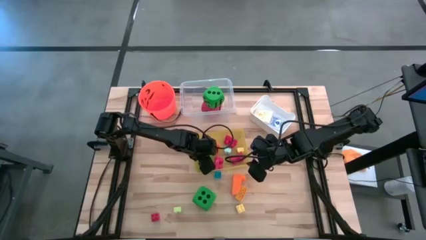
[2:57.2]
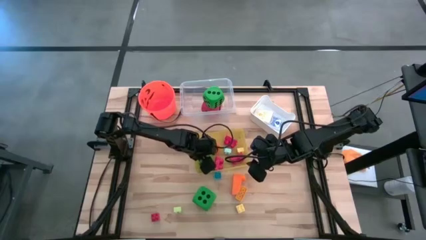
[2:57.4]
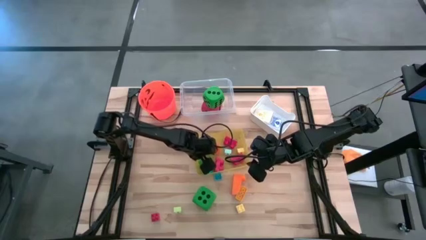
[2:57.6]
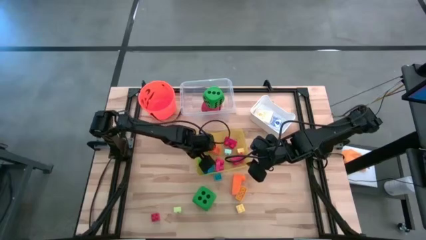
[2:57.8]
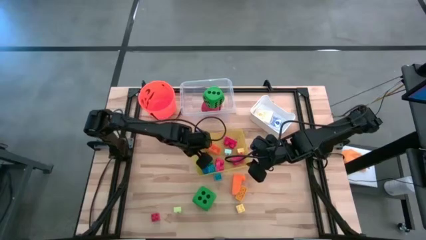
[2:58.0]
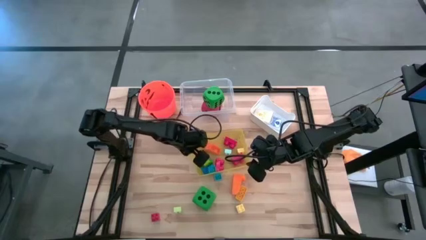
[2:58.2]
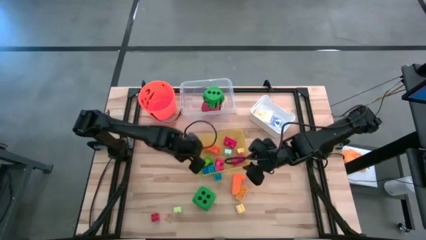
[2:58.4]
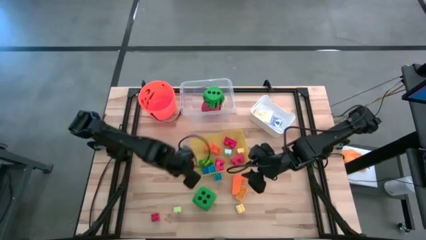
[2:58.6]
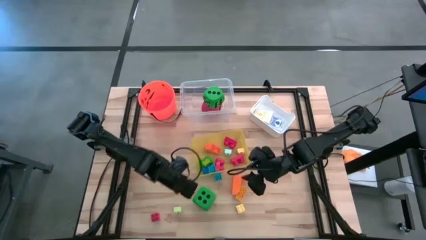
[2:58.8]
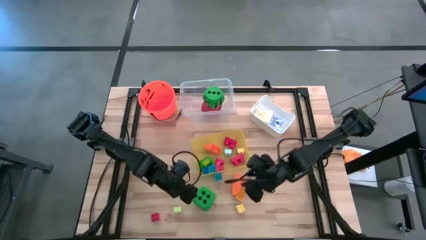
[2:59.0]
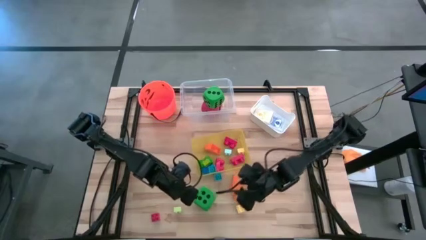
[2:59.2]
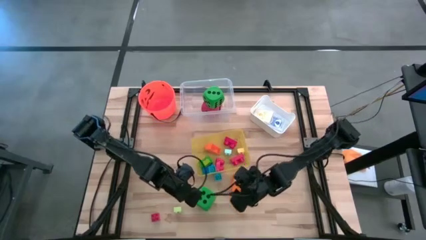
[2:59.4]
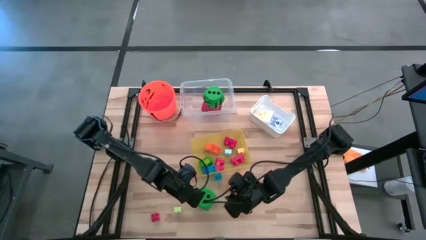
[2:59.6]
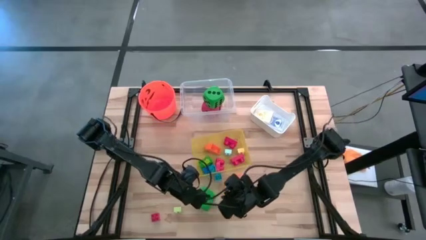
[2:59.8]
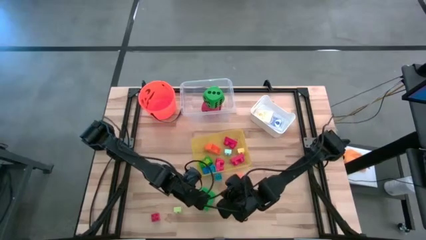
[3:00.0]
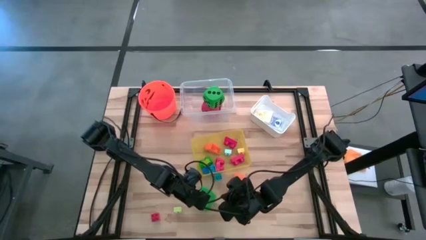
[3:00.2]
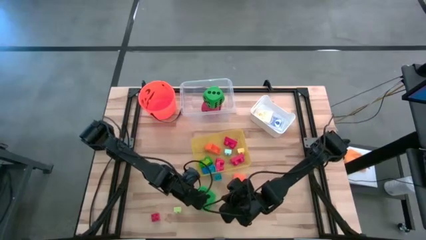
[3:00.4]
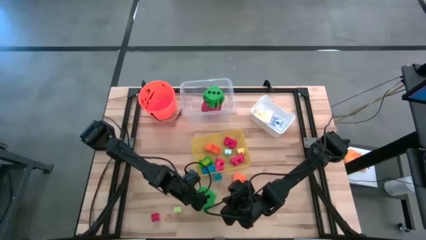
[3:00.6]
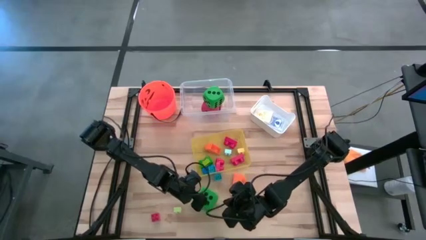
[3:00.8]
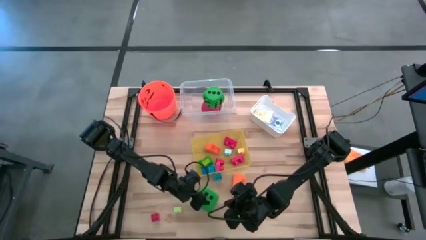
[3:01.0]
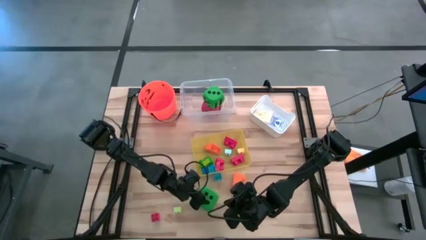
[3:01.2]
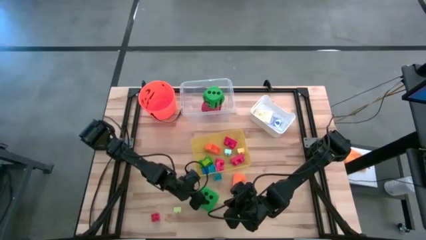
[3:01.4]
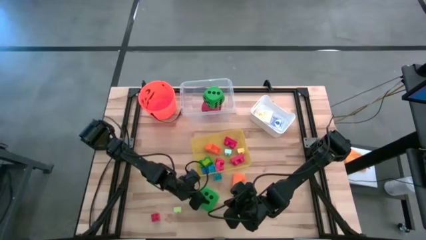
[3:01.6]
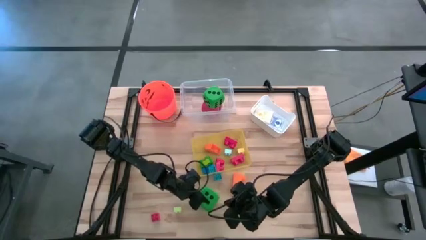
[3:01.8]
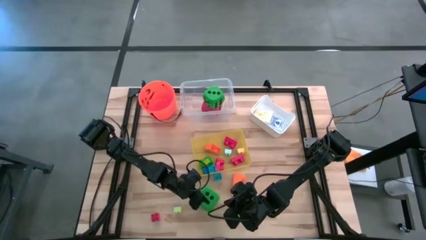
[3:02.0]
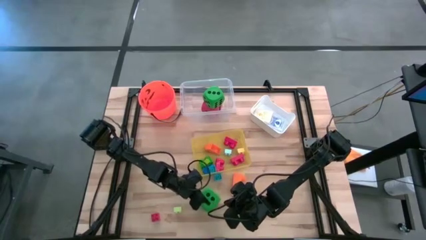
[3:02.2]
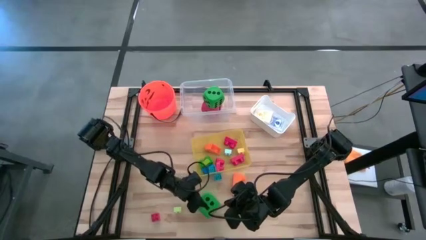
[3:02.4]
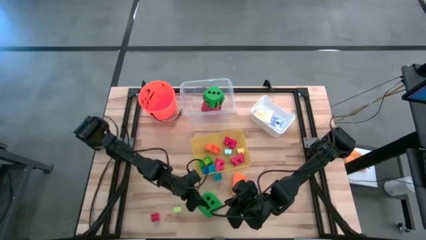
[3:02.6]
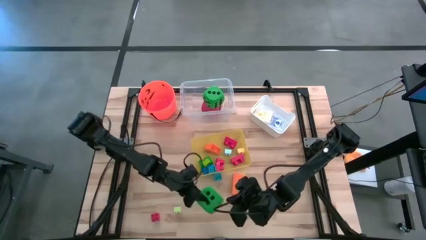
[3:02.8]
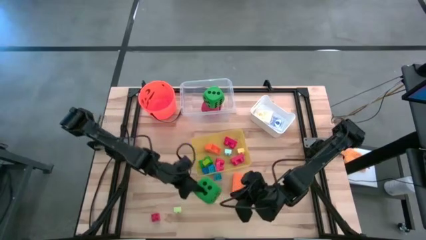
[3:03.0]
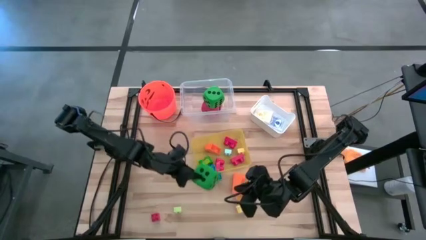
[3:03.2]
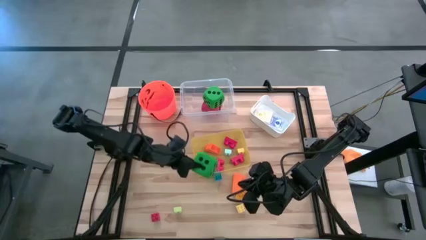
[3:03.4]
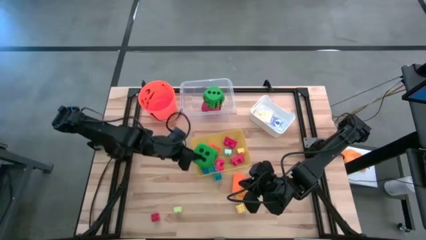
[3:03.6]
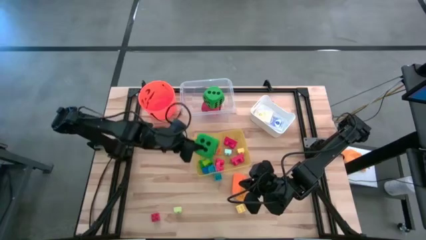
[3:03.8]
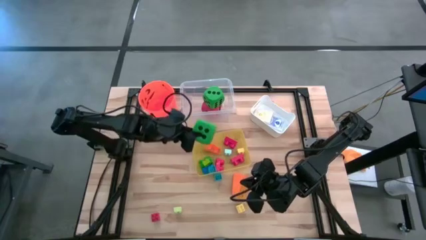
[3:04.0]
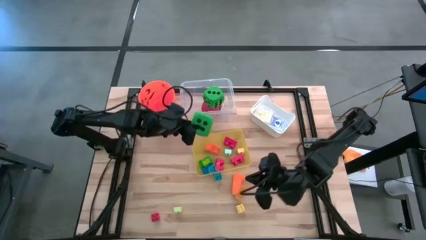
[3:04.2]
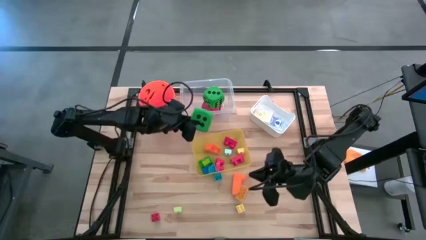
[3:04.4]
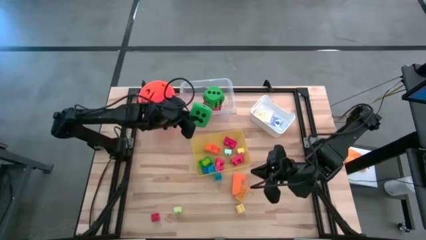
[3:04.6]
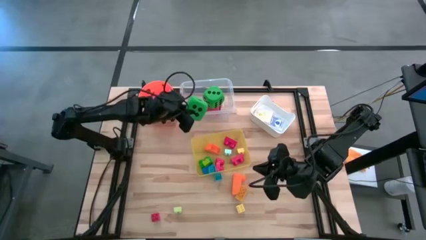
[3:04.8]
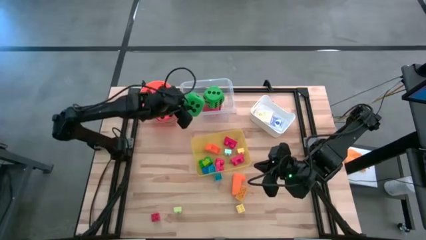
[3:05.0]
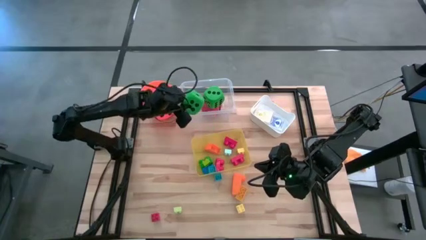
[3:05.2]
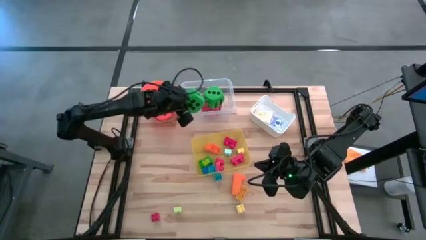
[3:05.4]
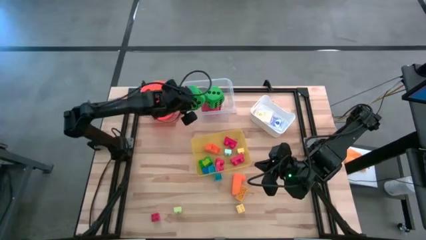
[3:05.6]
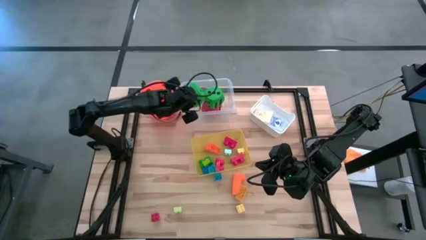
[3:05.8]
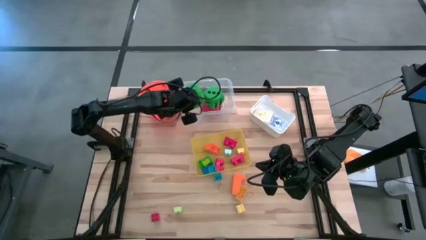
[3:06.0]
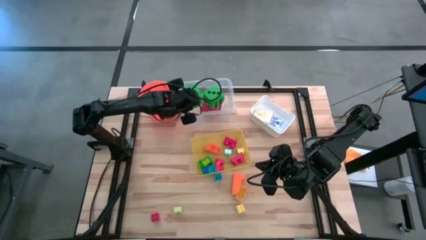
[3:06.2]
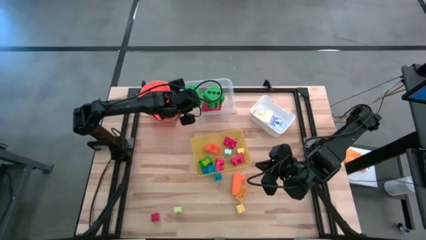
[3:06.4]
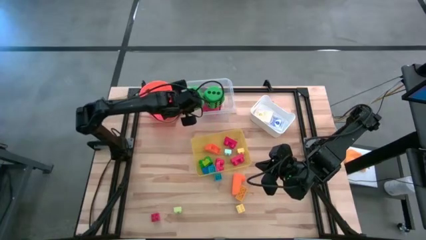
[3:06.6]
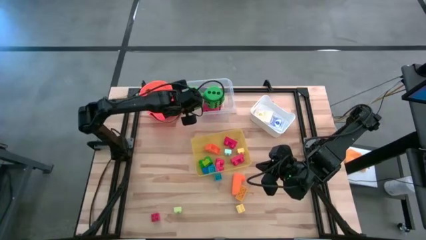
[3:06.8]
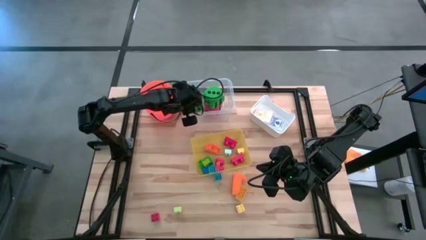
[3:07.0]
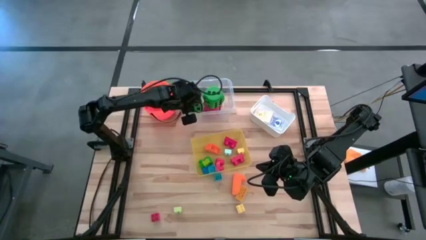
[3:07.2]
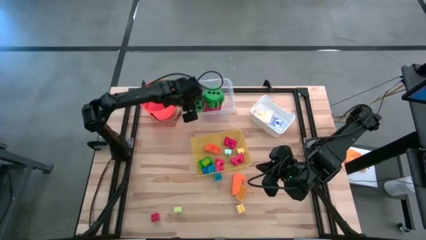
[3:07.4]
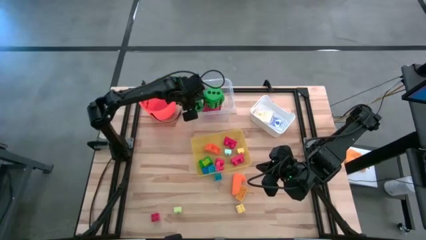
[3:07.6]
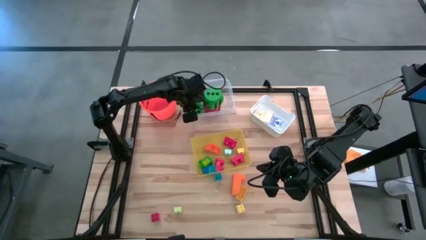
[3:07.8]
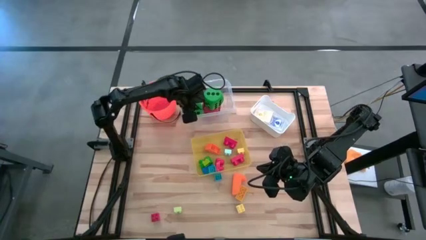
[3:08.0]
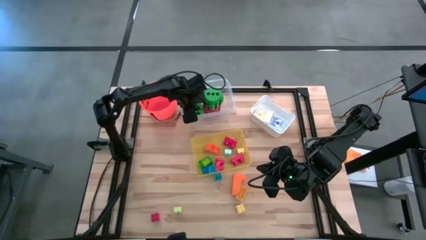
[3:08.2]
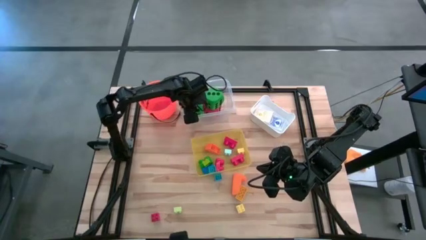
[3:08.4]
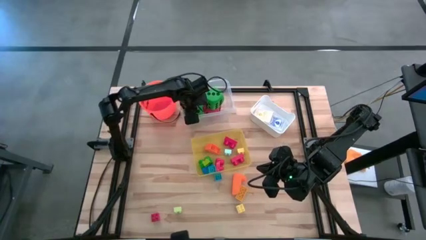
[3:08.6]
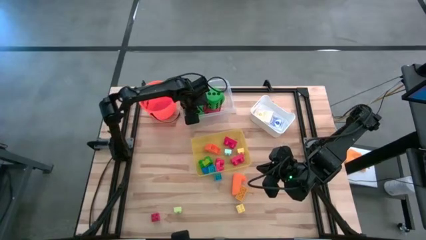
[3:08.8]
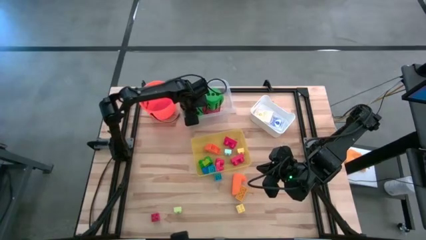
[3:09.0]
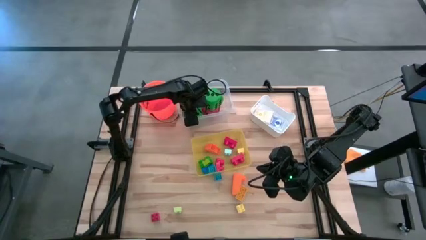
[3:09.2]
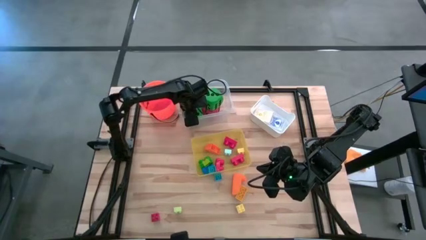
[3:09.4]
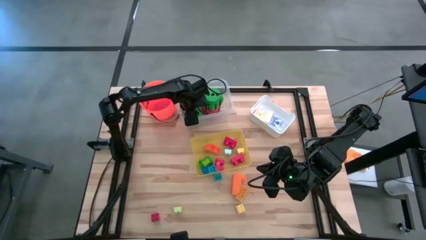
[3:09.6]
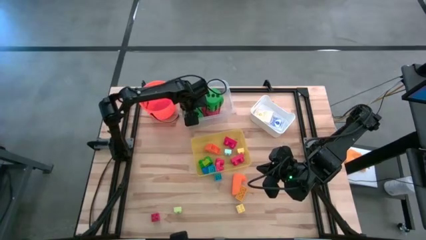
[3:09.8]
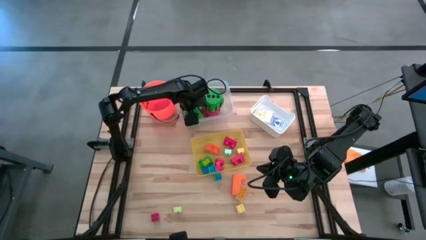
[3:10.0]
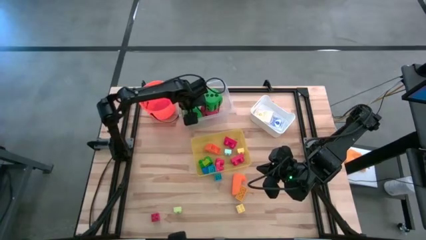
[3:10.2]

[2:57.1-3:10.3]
Task: Pick & Place Toys
Put the green dice into the transparent bin

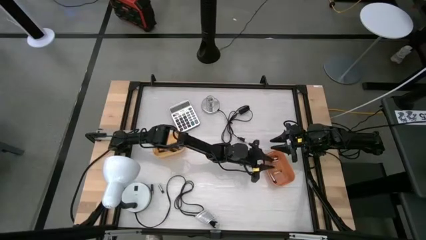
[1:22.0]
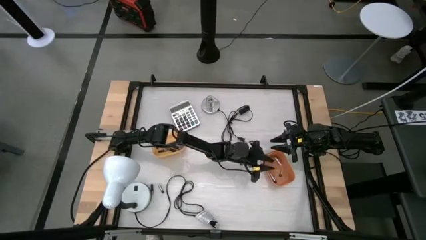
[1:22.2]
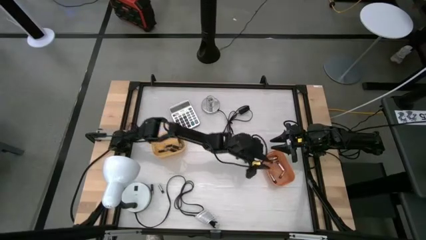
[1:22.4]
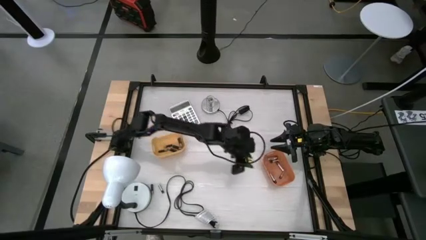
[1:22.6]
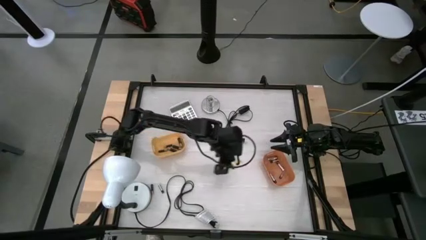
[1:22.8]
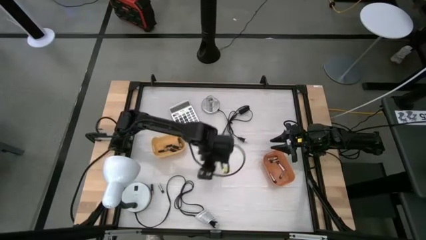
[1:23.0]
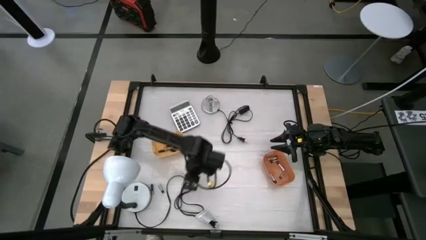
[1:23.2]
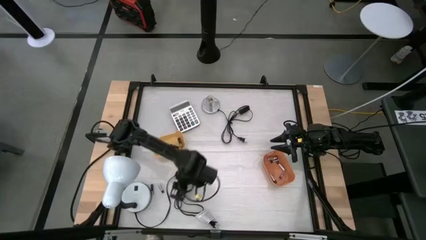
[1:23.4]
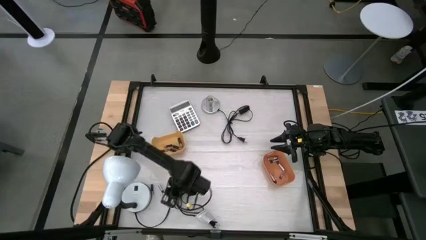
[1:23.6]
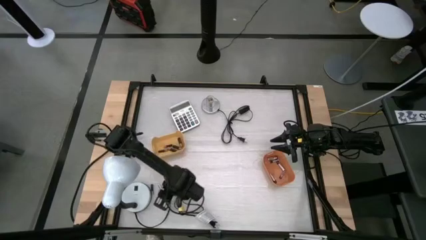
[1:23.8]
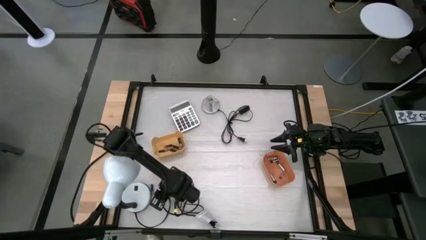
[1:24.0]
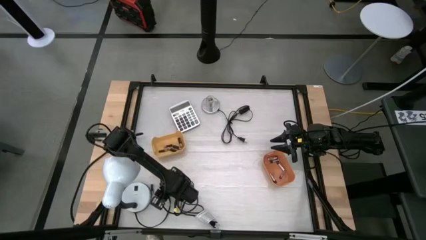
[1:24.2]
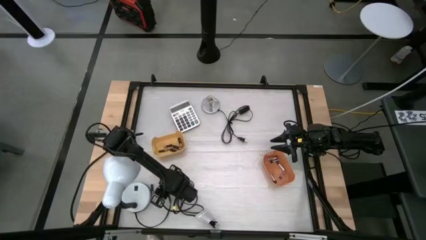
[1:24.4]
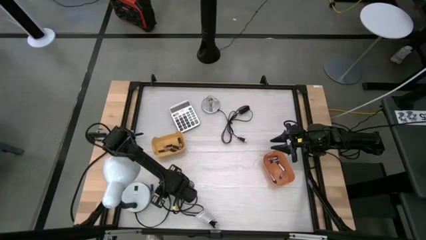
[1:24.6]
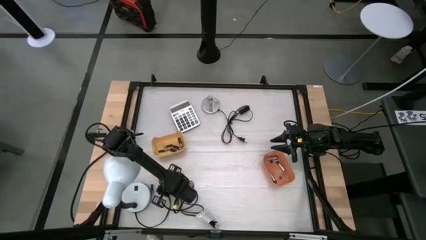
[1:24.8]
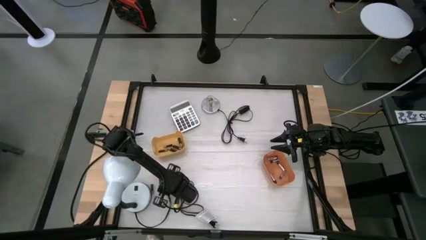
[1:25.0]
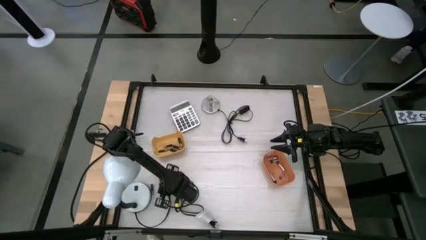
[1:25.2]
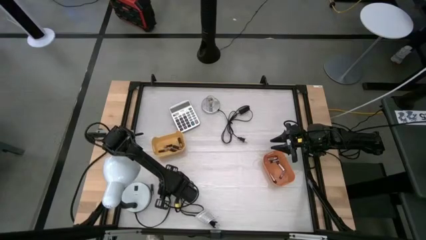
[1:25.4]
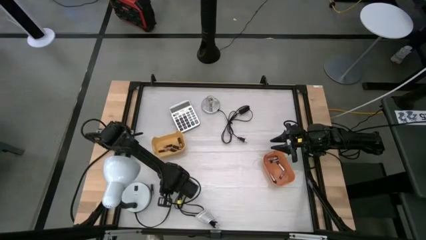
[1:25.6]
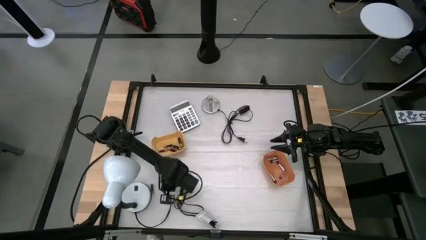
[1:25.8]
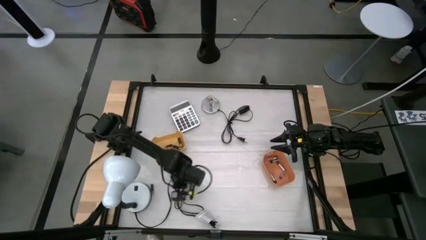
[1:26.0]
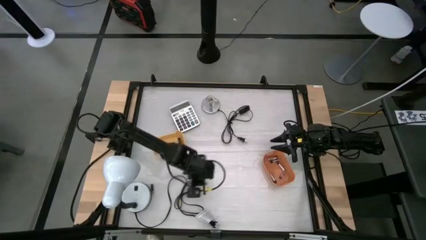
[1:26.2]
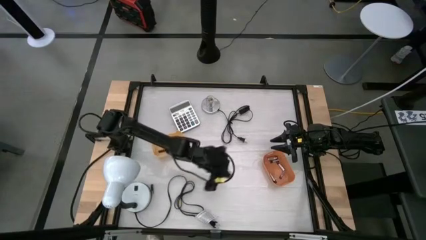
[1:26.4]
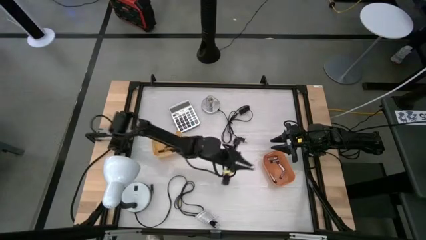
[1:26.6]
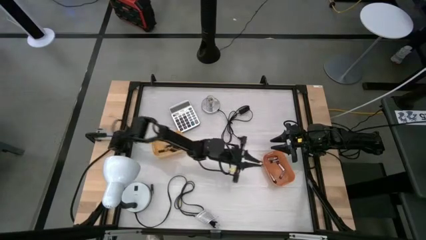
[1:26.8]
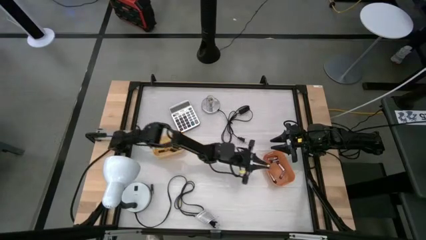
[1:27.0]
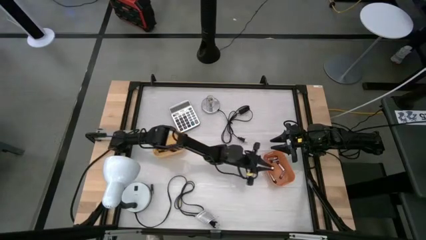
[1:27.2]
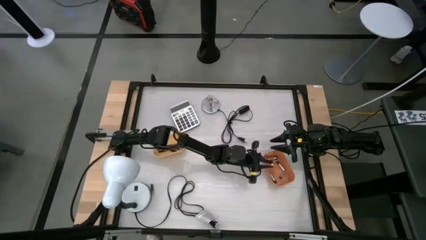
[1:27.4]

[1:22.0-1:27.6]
Task: Sort batteries
Put the silver battery into the orange bin
